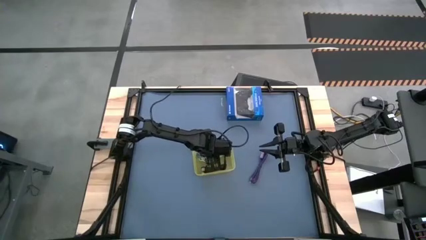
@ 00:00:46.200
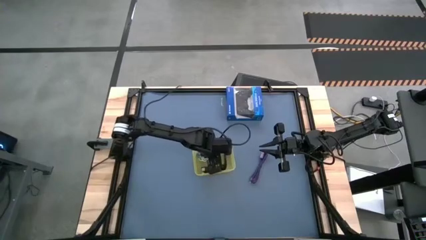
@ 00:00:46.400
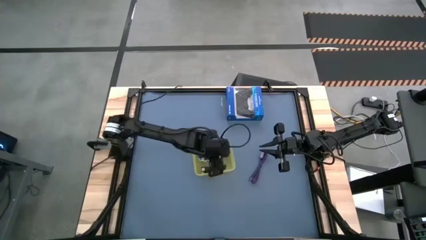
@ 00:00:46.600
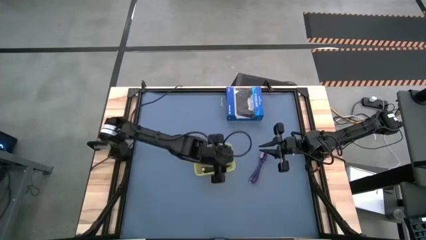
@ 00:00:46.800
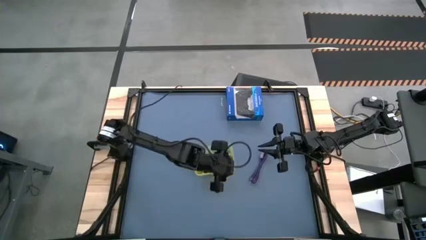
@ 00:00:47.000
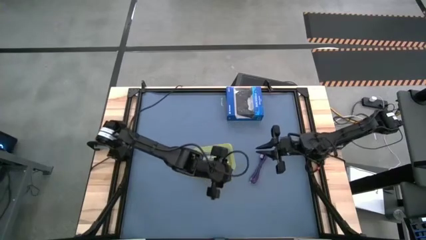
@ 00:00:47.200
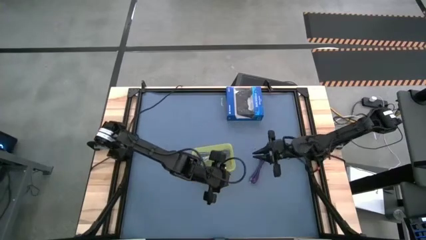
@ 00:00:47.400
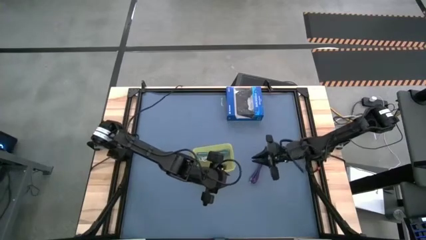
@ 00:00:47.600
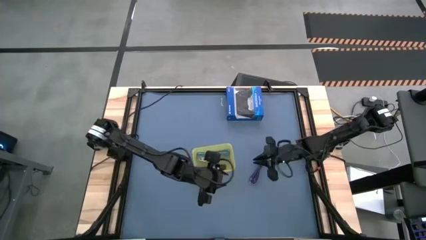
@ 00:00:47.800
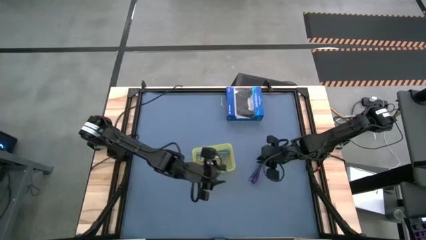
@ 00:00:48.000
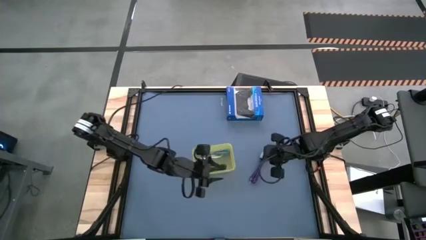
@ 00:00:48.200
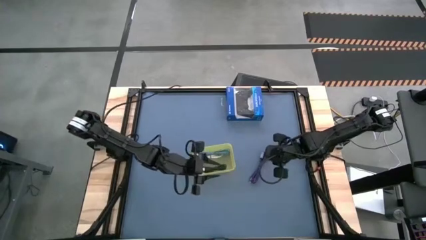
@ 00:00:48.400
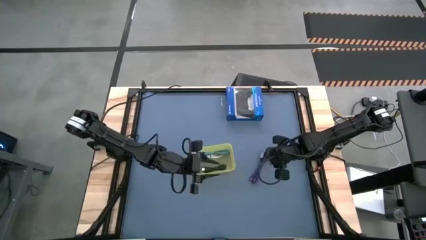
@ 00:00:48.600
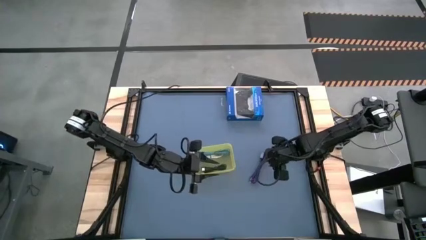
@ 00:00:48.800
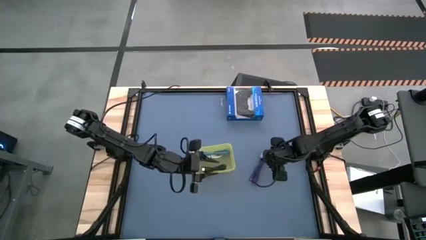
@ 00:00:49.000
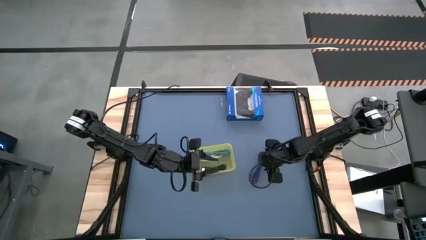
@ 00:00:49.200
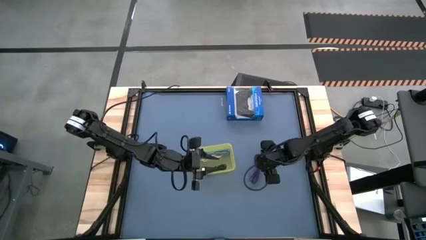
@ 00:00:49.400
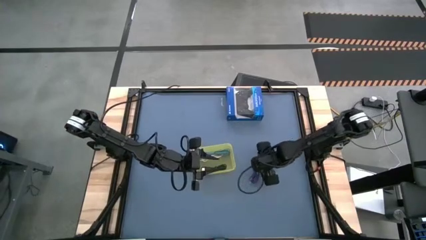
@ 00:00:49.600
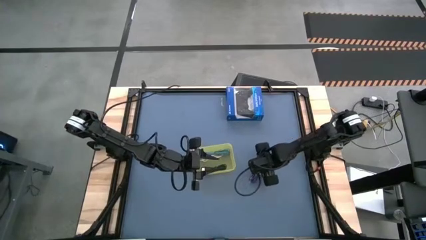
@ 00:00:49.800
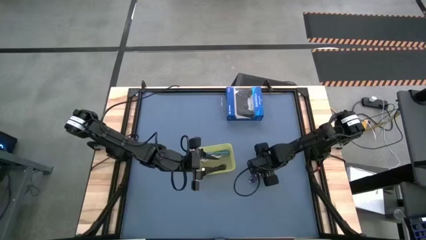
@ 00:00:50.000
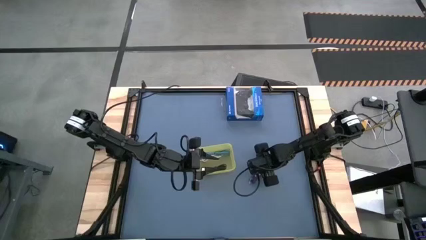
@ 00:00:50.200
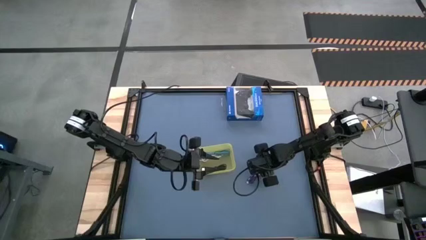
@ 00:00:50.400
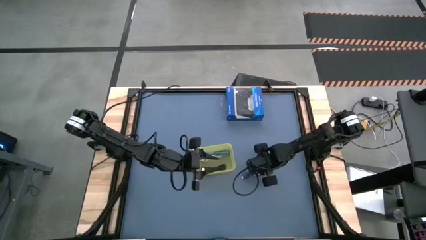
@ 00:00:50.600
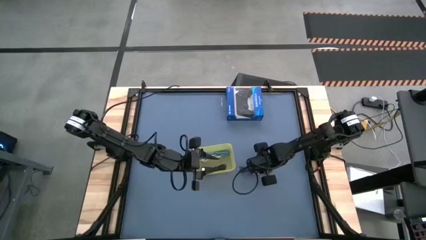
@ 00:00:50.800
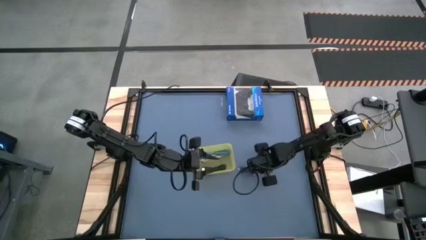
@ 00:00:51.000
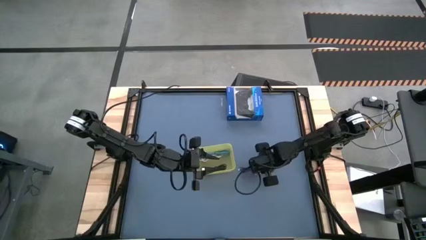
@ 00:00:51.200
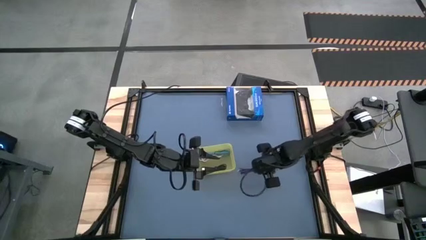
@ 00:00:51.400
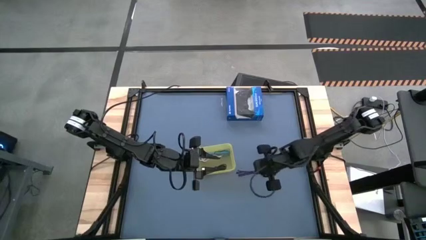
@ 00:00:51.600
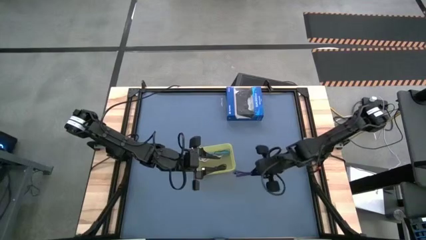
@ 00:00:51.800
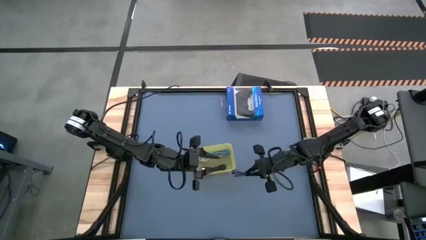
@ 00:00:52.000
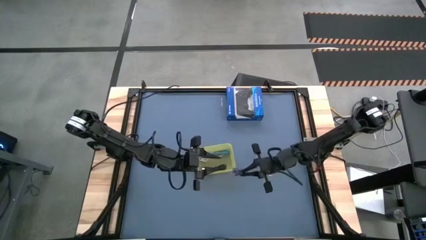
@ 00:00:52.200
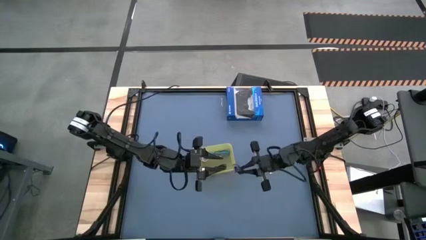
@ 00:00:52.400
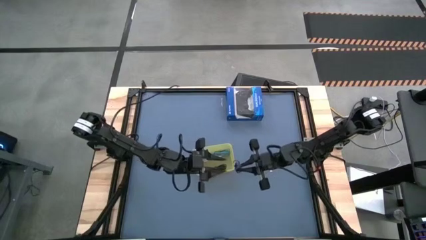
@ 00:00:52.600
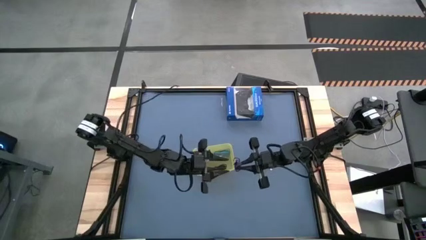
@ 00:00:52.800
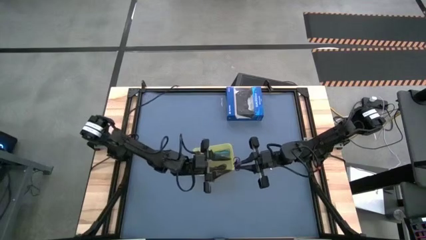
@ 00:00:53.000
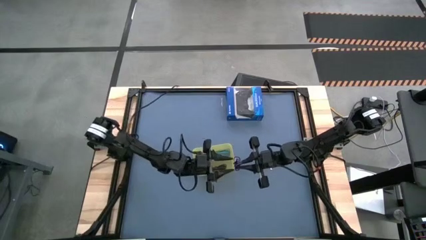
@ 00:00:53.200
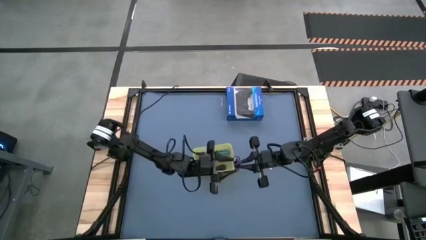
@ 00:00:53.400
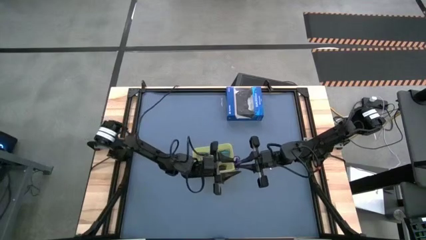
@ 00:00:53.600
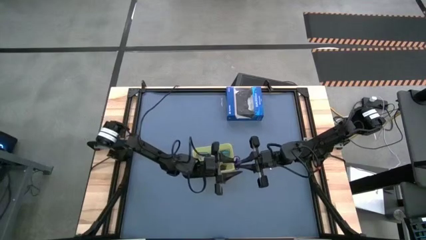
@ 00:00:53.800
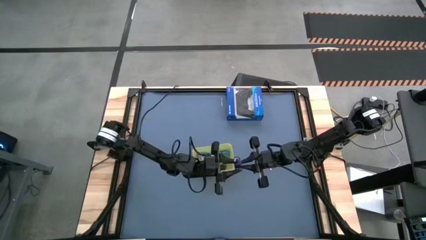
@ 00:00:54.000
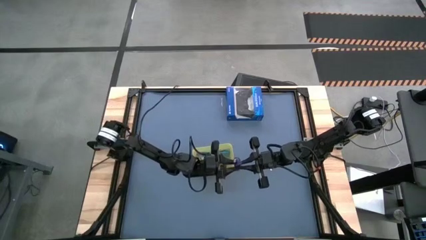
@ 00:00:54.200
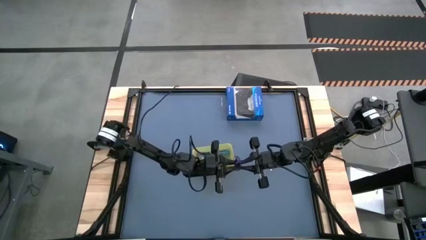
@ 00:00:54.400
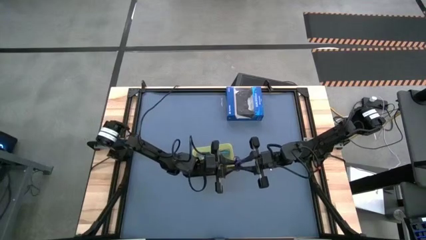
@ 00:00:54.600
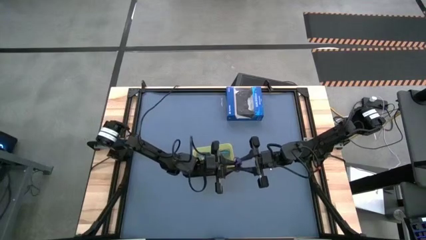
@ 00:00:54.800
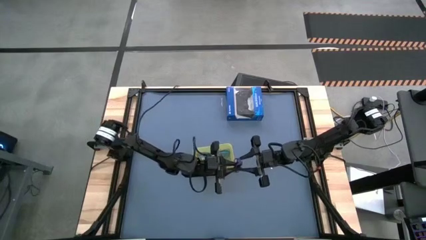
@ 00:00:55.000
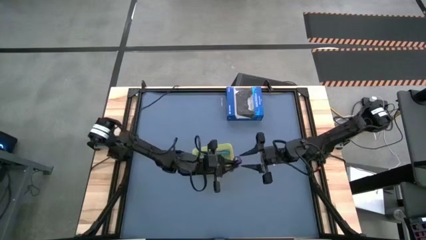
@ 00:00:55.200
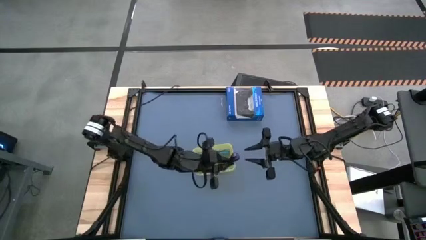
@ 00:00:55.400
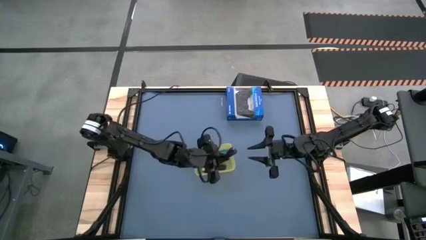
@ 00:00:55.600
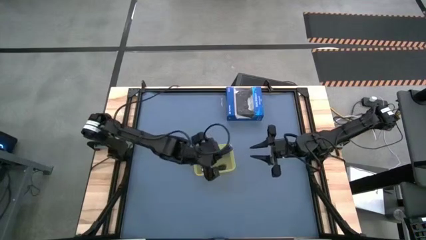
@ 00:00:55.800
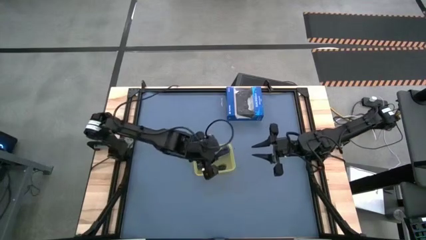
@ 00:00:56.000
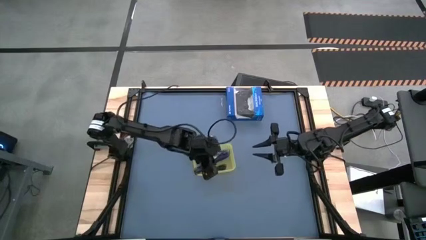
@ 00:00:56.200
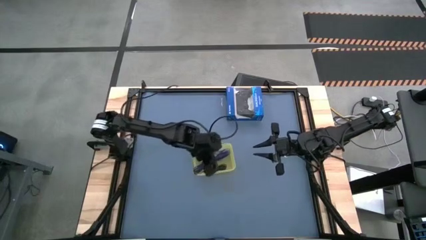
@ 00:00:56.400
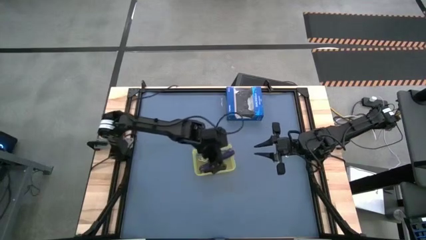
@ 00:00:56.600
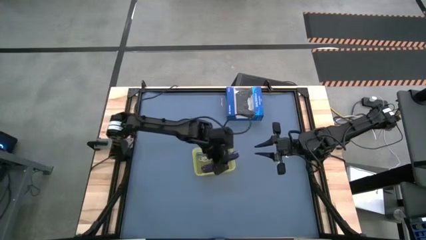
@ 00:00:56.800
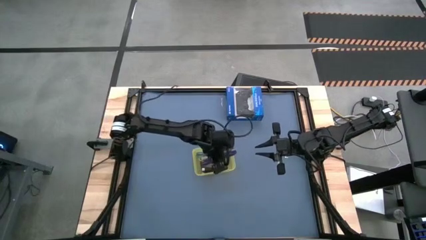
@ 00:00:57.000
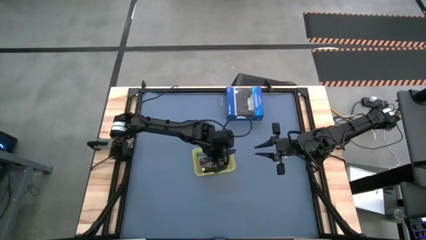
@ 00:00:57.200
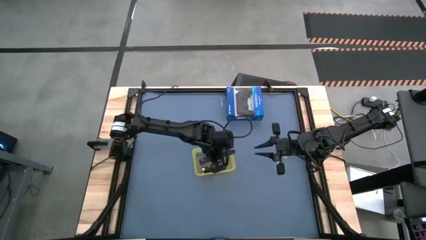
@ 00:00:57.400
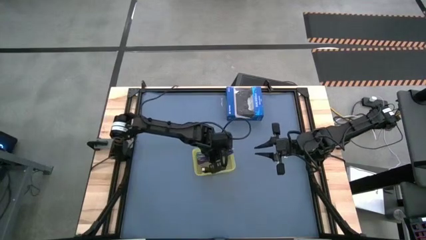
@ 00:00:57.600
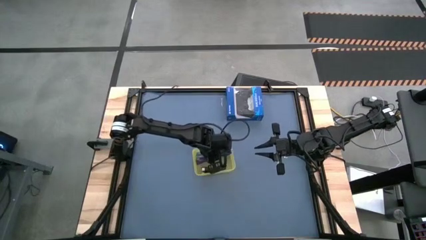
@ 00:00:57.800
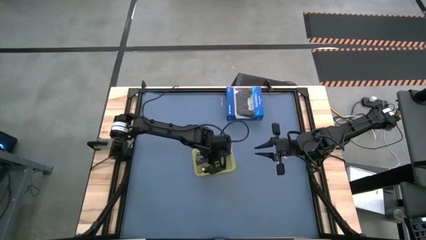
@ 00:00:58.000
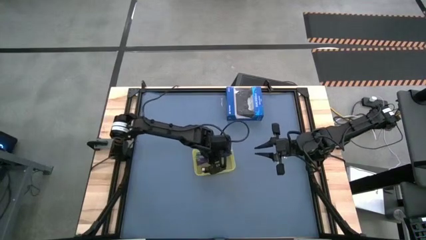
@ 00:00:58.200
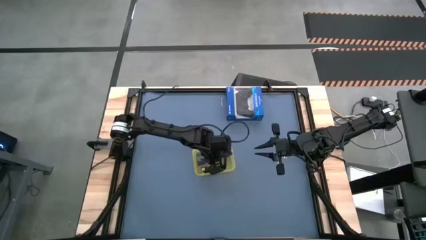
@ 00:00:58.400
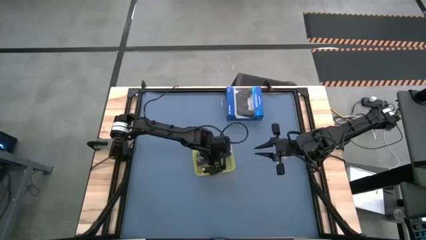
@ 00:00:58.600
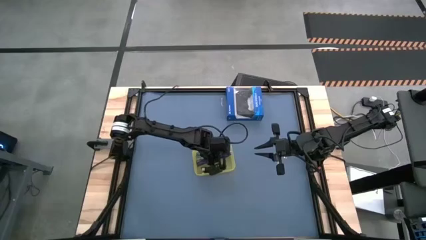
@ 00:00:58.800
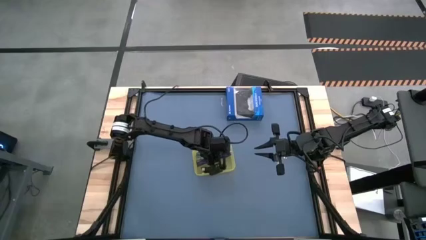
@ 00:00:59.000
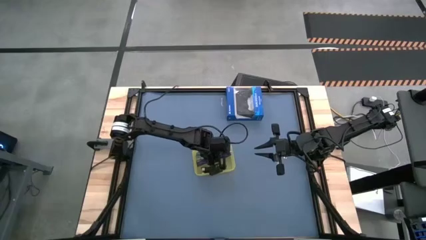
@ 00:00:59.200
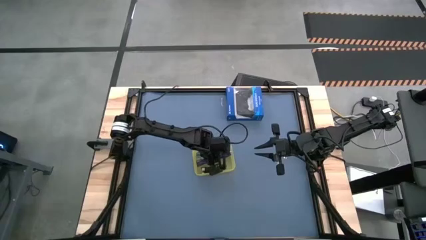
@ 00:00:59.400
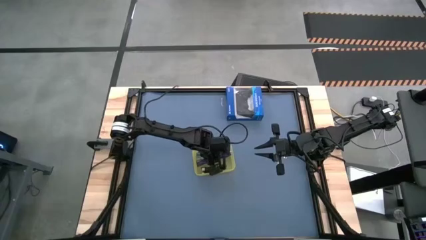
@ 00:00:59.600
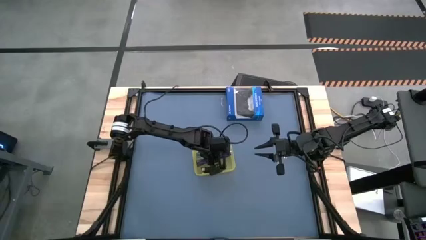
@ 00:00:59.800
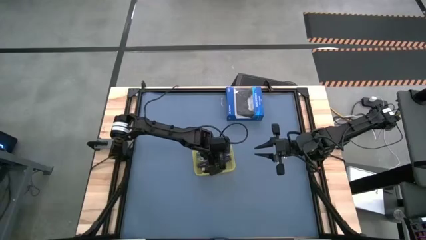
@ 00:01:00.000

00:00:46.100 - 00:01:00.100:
Task: Pick and place USB-C Cables
Put the violet charger cable into the yellow bin

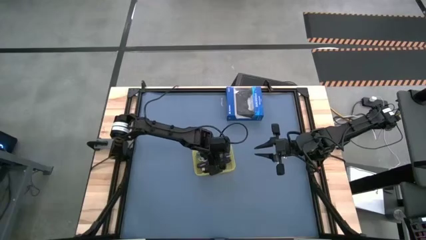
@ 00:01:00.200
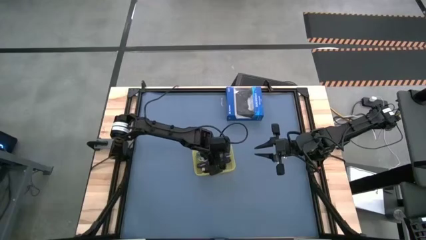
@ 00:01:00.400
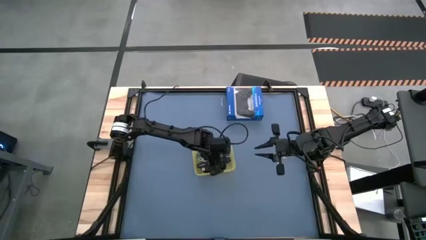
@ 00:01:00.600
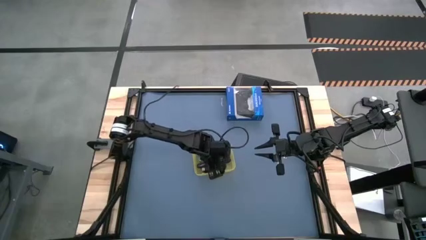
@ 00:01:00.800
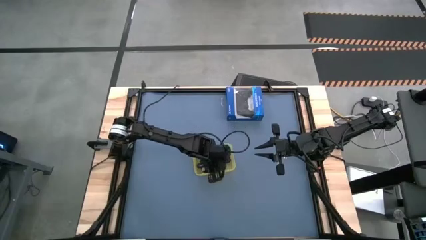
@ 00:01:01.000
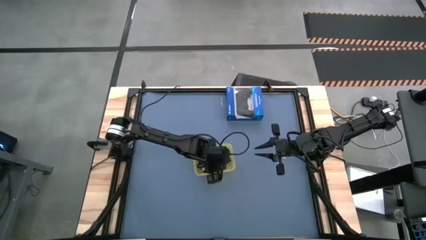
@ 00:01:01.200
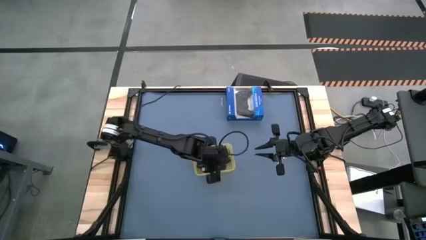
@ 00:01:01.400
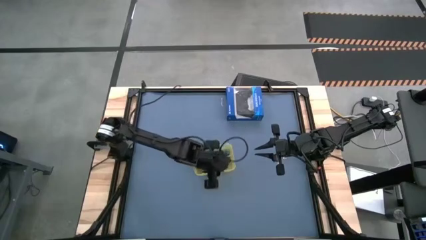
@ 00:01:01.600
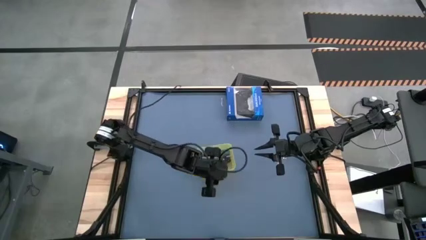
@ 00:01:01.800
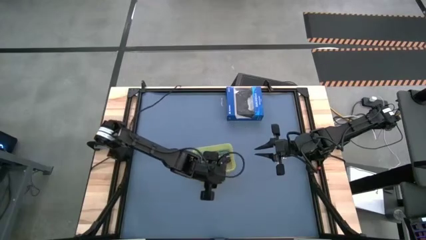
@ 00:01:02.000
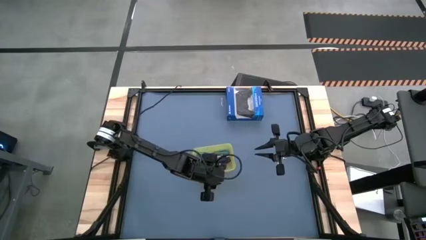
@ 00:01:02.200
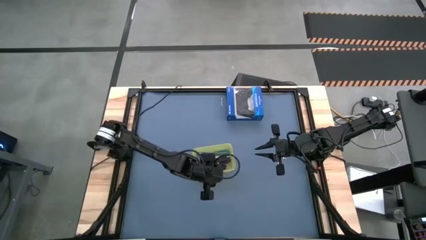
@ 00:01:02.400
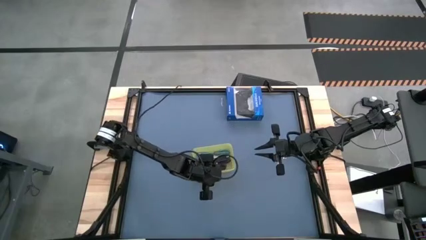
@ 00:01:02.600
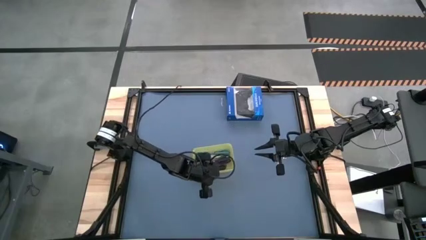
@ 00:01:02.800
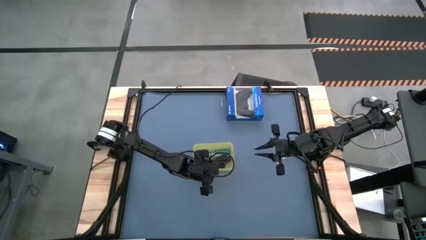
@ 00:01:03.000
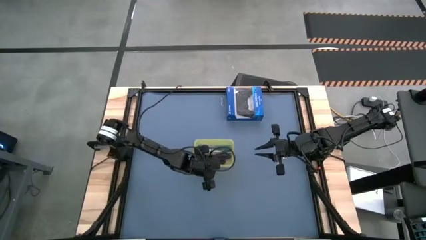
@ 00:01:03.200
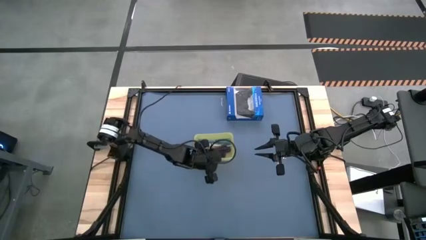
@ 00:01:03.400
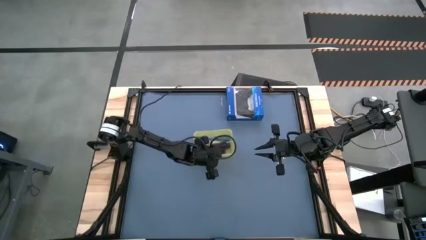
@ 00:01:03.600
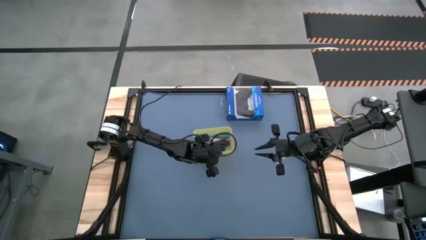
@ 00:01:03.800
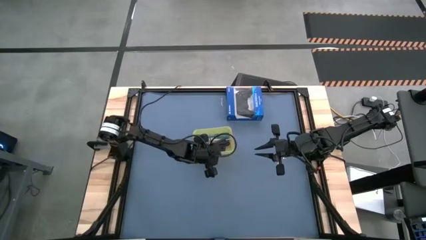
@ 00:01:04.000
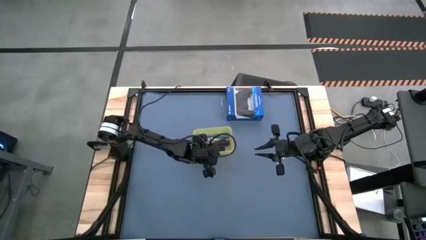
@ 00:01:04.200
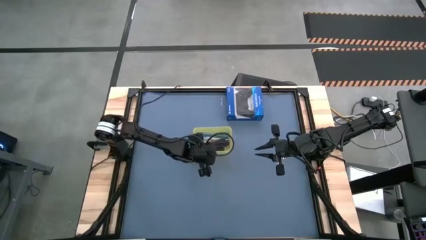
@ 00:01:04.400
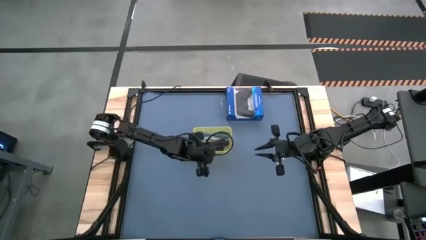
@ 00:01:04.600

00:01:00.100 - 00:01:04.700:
Adjust the yellow bin
